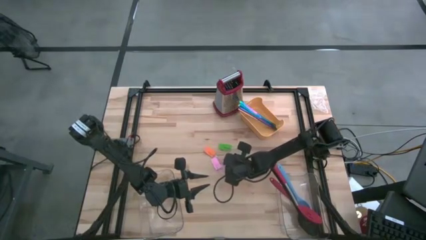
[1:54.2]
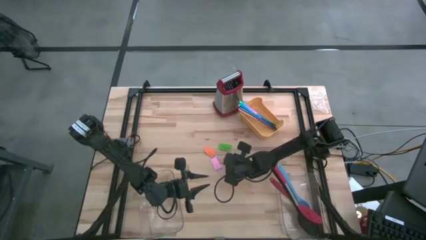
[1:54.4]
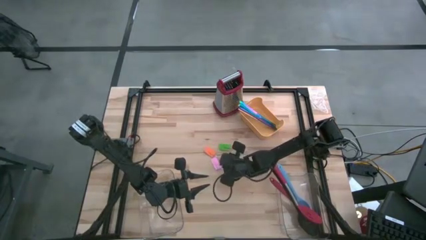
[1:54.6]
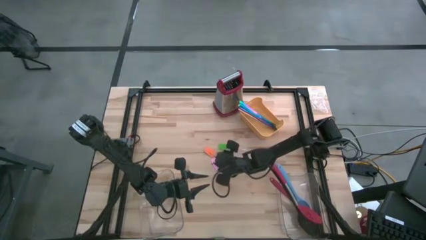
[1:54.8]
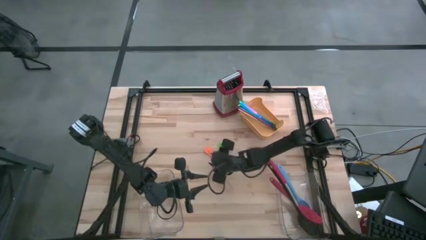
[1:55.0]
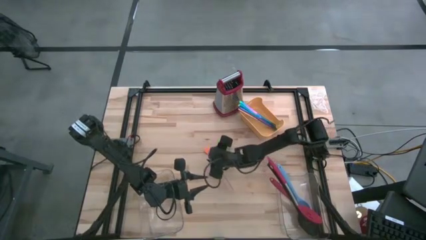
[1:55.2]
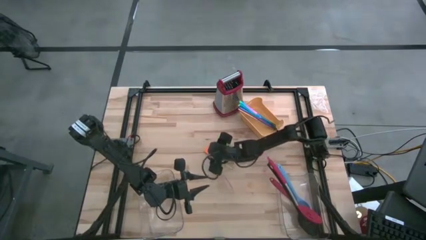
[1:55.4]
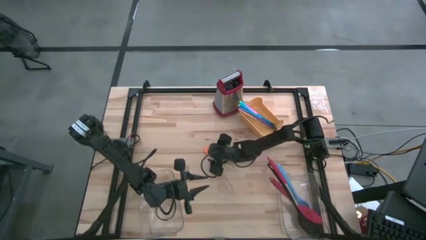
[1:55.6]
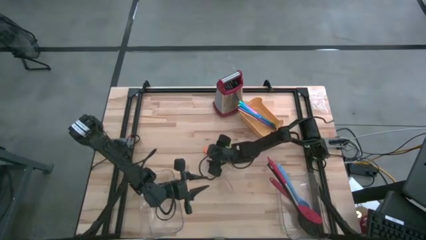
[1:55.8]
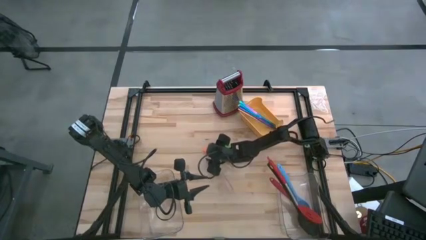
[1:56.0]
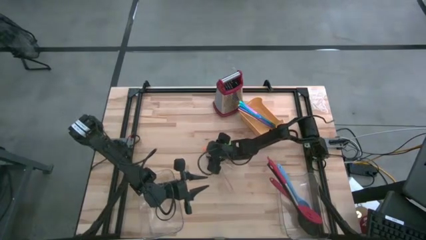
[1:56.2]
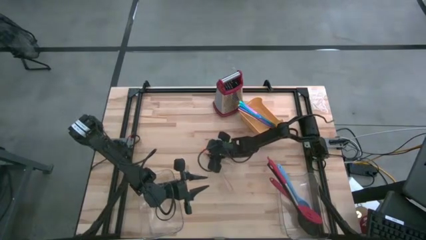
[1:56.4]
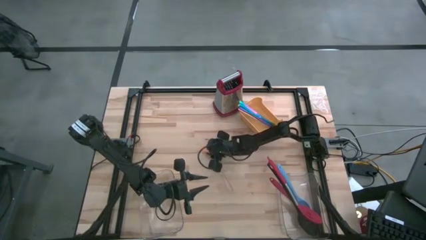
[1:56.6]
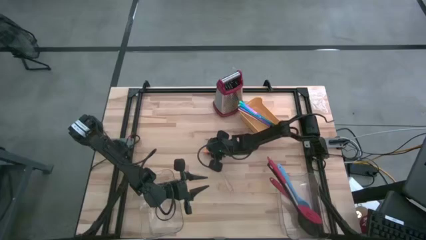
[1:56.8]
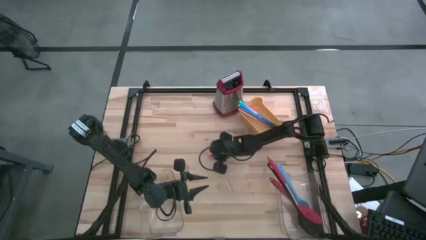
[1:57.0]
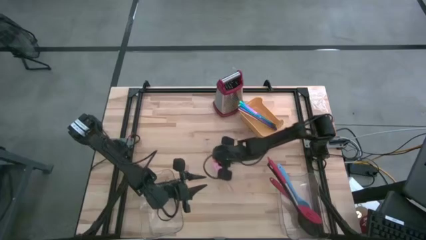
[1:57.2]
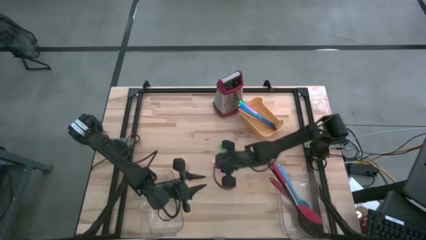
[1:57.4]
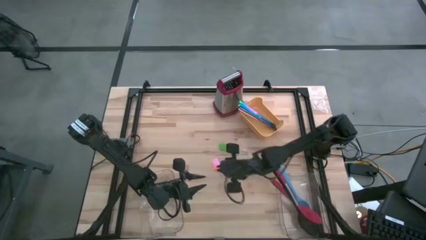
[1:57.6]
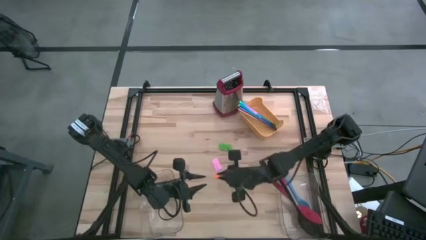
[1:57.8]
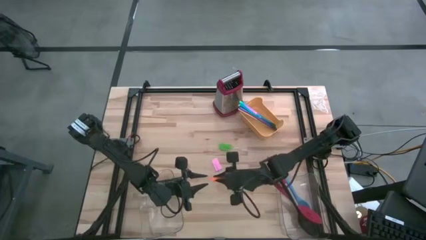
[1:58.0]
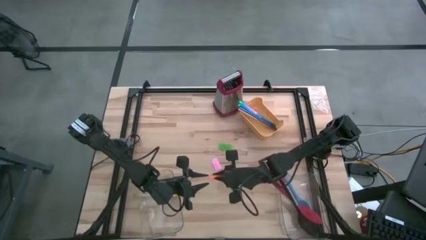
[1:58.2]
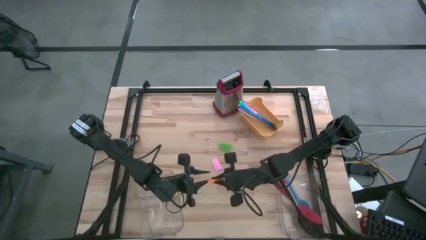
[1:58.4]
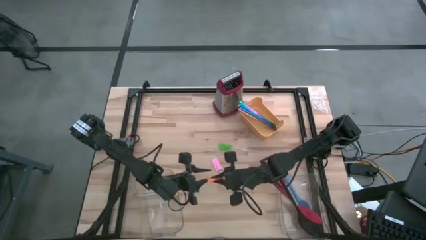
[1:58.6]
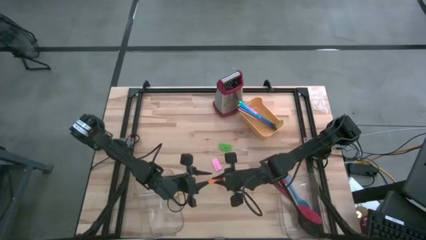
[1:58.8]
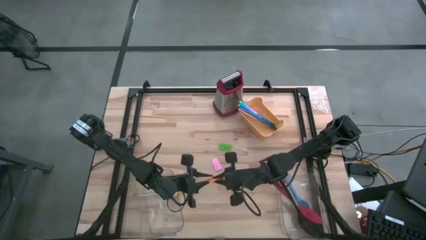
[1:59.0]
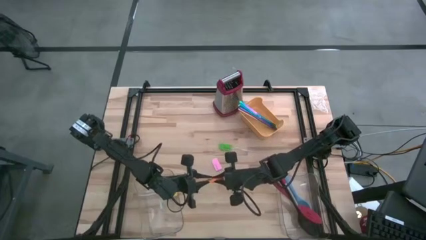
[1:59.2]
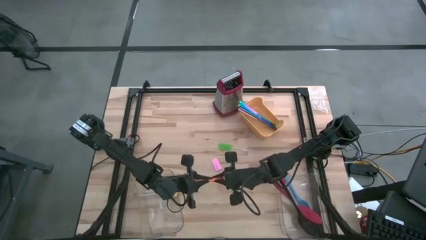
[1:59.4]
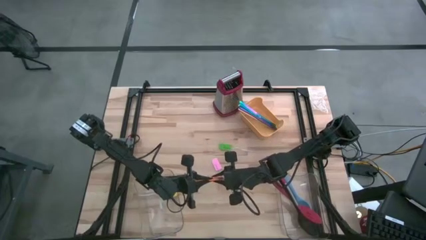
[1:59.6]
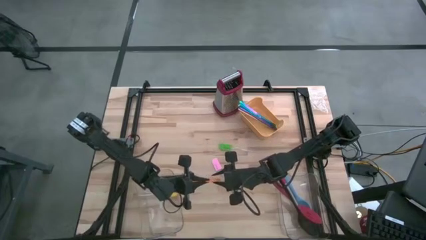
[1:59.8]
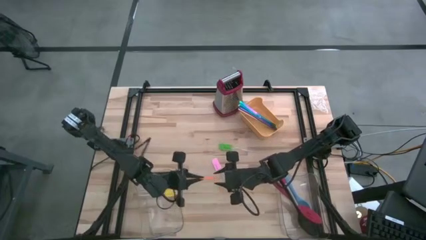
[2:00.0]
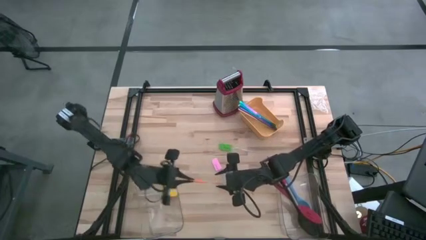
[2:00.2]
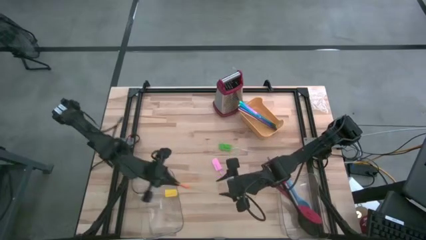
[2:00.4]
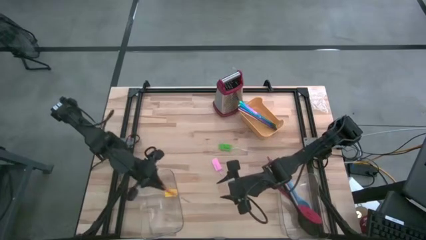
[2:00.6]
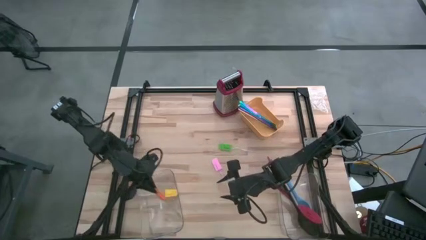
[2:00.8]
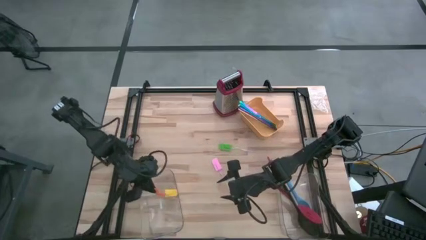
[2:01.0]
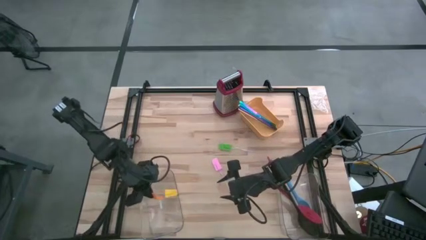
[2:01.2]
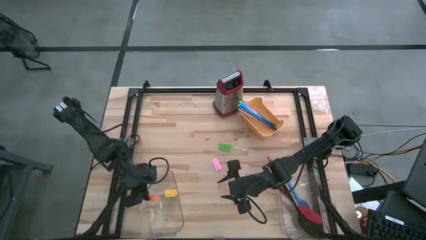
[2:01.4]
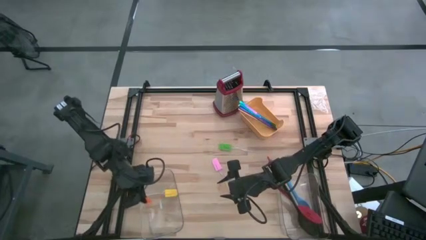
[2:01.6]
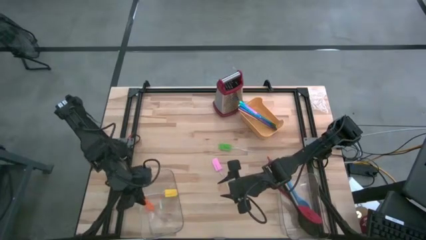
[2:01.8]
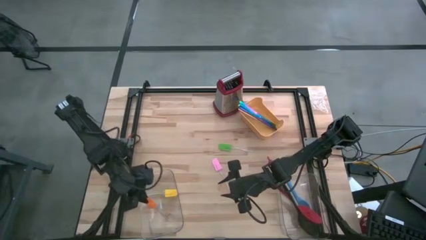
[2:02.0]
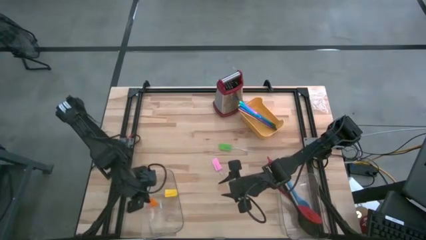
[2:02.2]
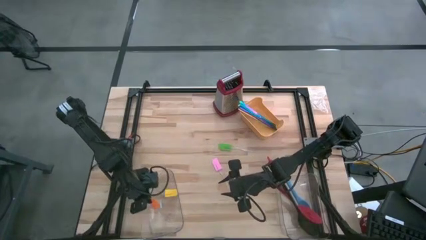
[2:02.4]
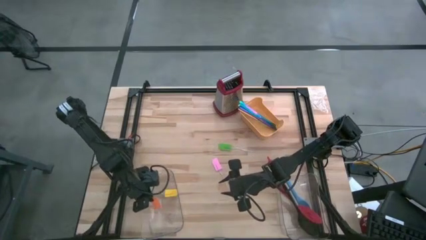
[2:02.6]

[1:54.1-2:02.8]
Task: Pick & Place Kitchen Items
Put the orange spatula into the left transparent bin

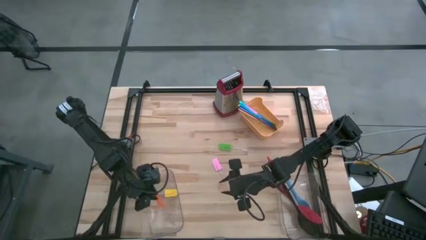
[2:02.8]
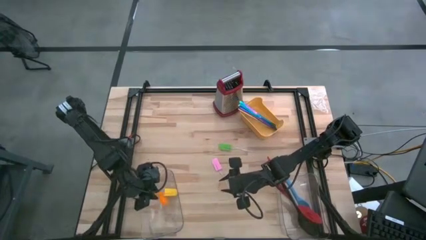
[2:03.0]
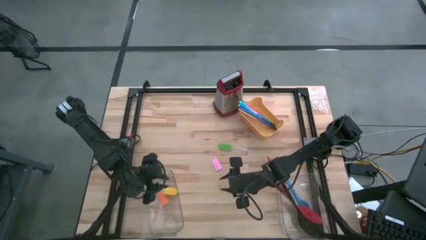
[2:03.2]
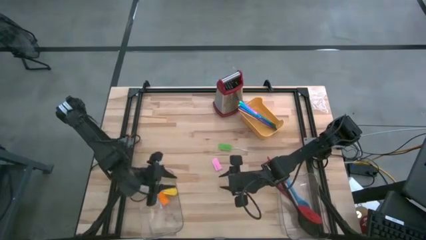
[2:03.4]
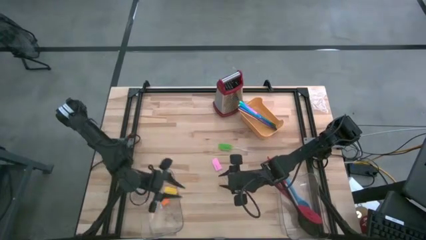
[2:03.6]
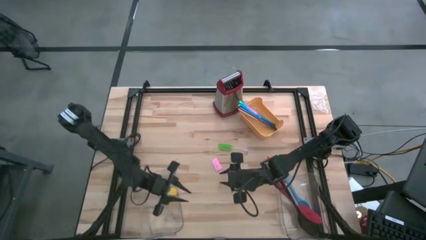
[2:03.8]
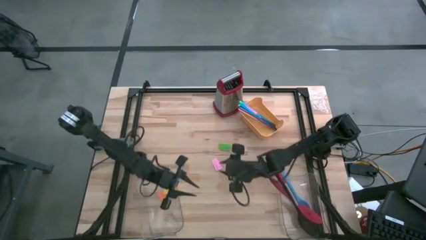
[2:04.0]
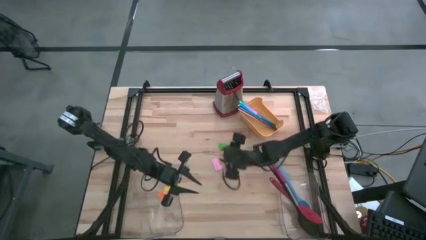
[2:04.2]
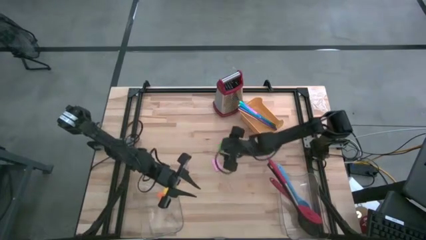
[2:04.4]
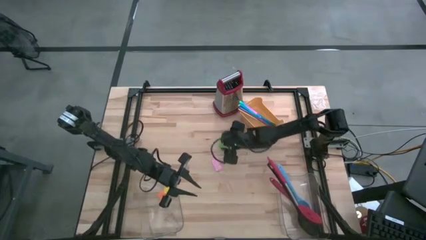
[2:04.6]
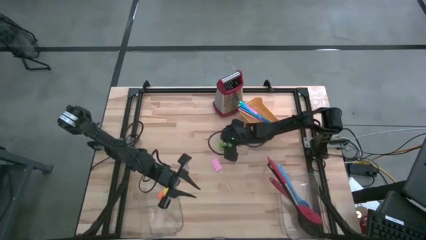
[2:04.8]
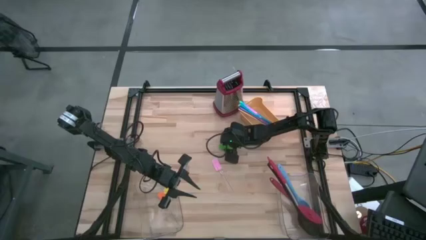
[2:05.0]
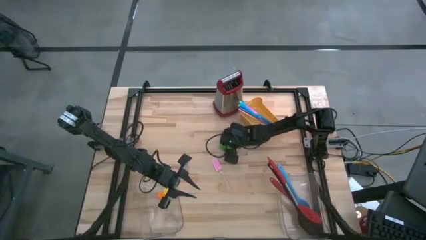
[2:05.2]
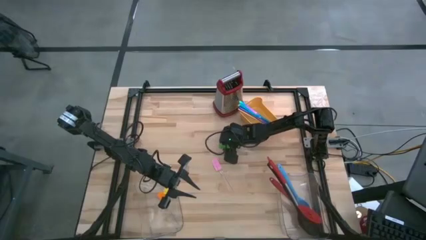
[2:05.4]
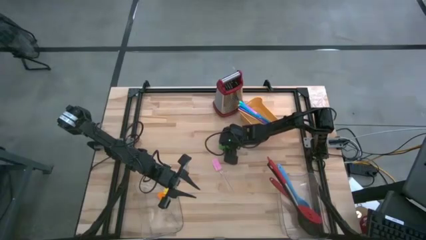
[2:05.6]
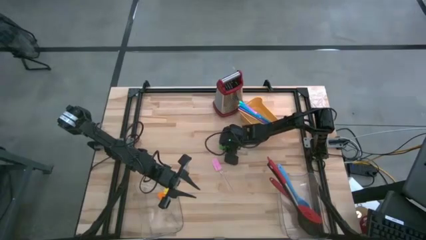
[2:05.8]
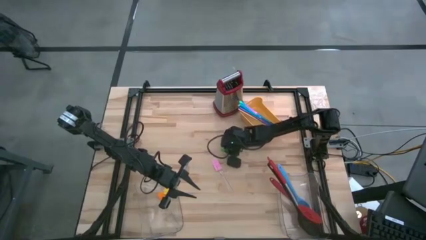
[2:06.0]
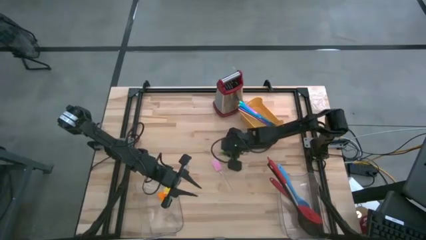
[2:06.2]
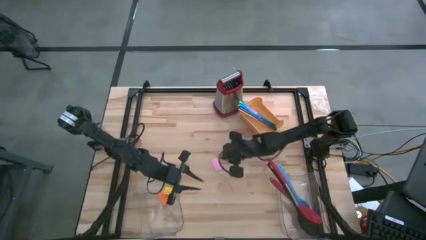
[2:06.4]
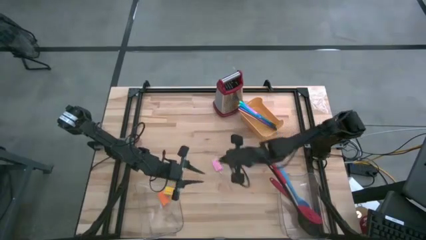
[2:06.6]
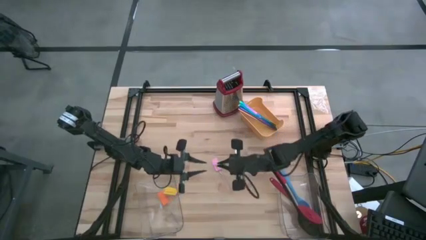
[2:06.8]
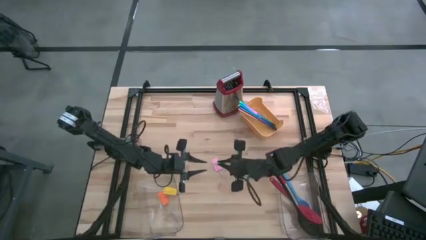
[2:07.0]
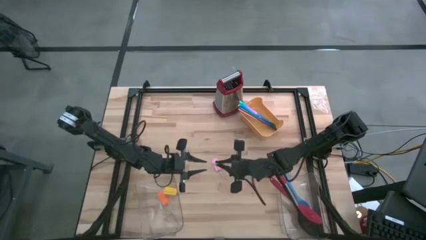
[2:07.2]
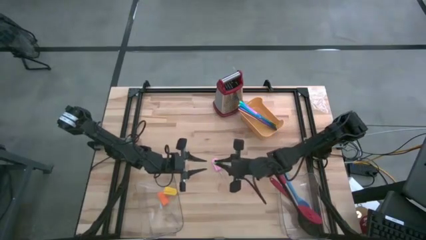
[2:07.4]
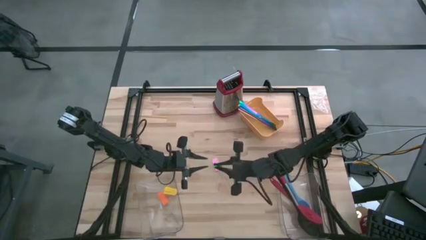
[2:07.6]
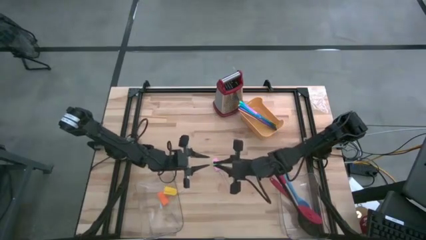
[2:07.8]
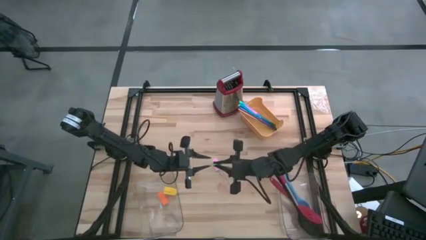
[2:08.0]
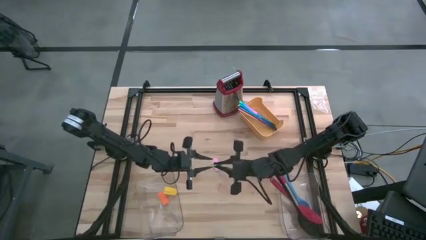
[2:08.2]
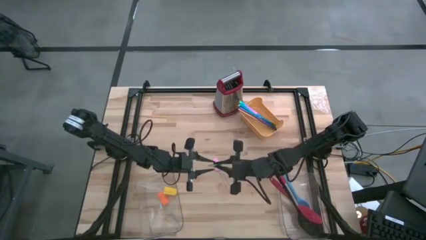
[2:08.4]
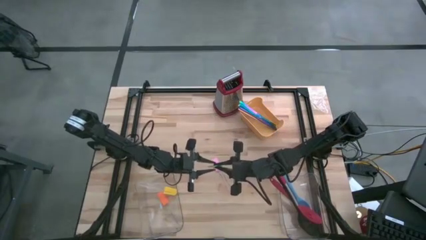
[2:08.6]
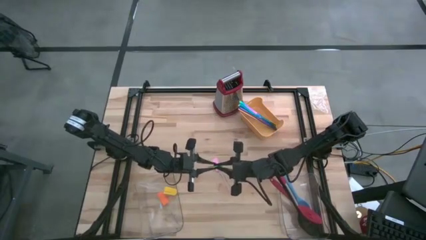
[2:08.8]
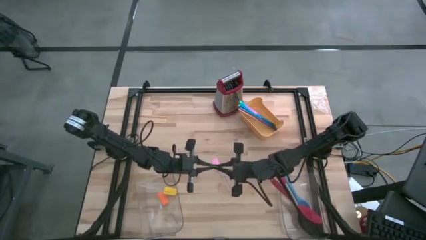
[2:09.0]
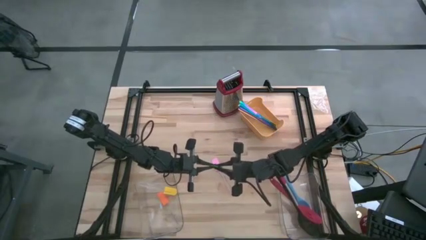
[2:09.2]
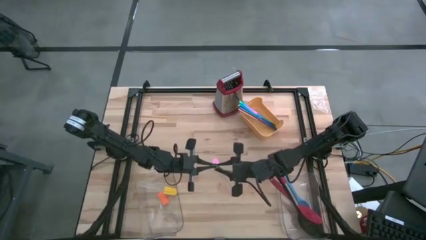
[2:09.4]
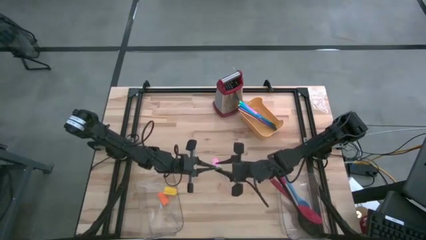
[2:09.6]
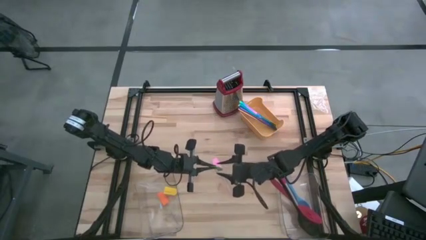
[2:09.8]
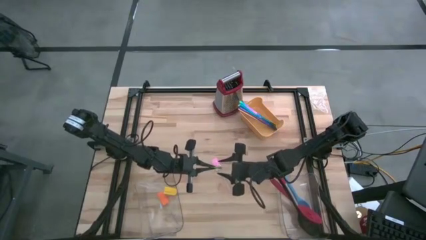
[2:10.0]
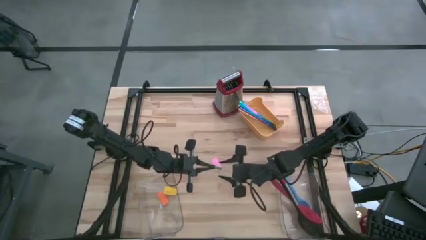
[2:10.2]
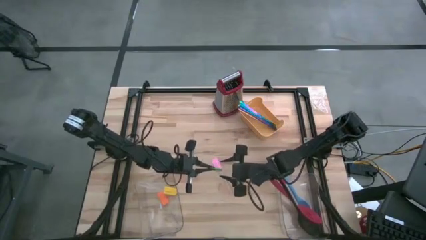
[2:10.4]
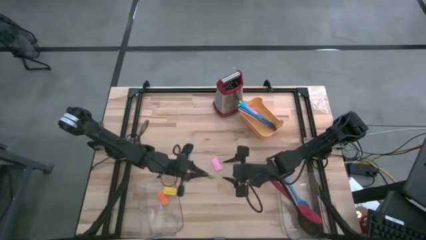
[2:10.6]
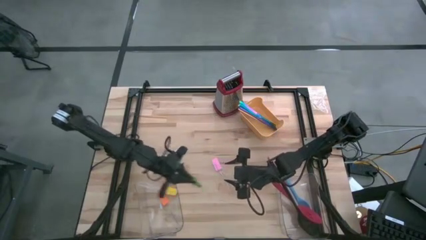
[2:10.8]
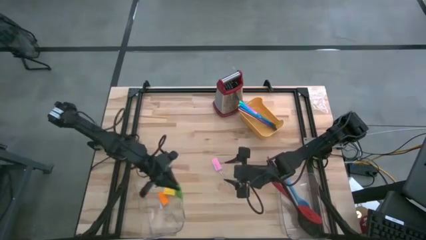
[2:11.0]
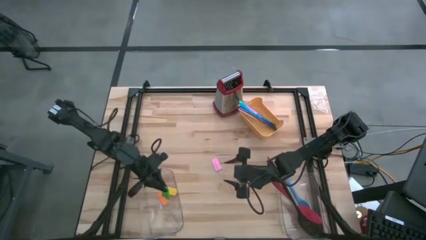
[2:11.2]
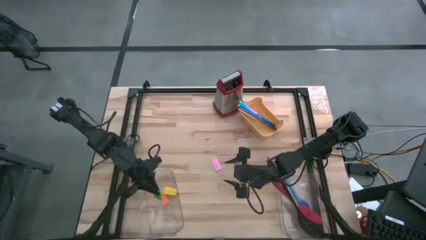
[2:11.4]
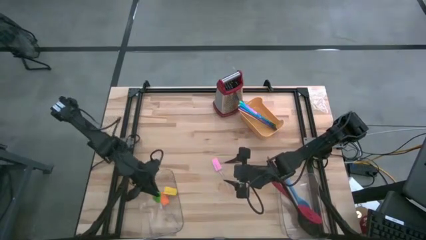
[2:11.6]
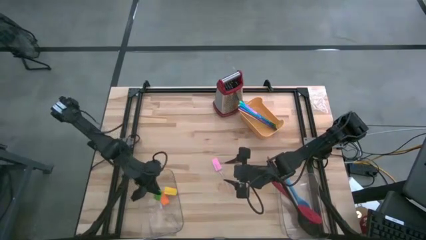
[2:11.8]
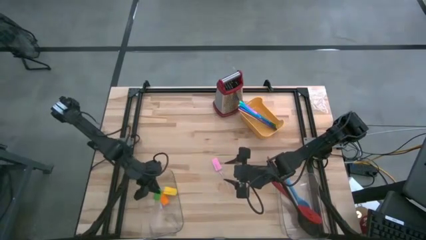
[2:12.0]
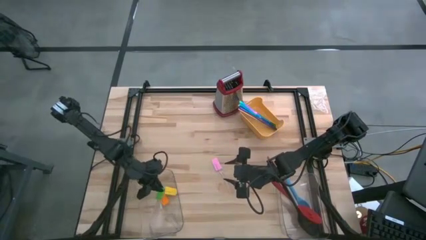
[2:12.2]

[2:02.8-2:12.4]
Put the green spatula into the left transparent bin
